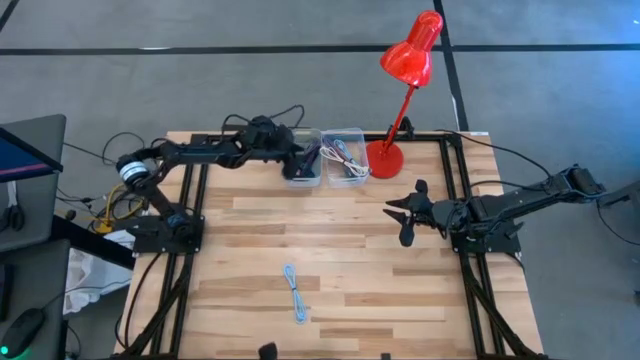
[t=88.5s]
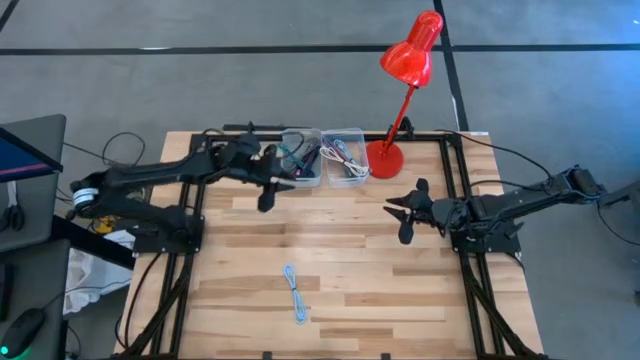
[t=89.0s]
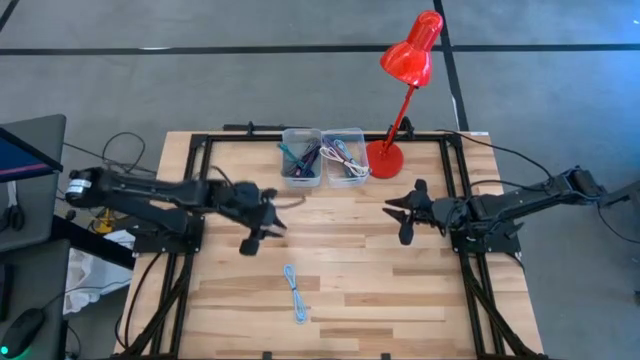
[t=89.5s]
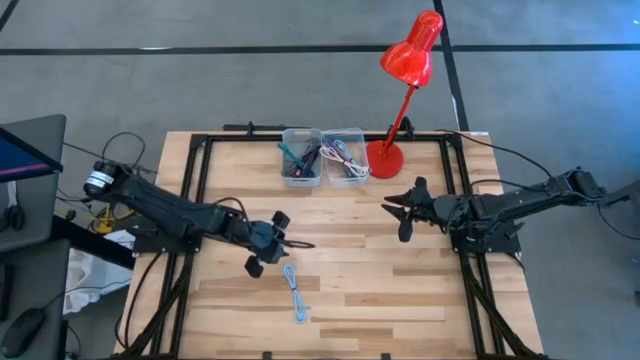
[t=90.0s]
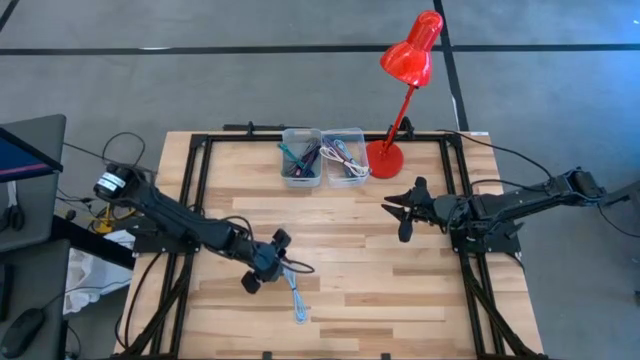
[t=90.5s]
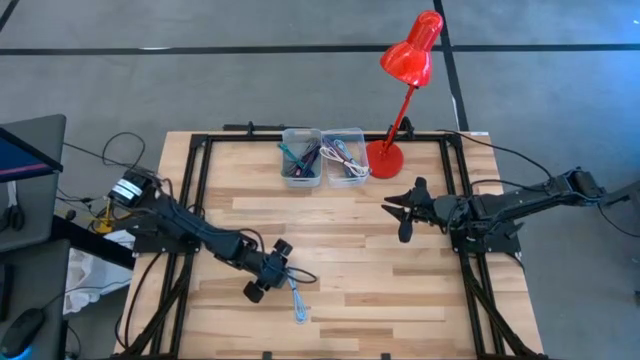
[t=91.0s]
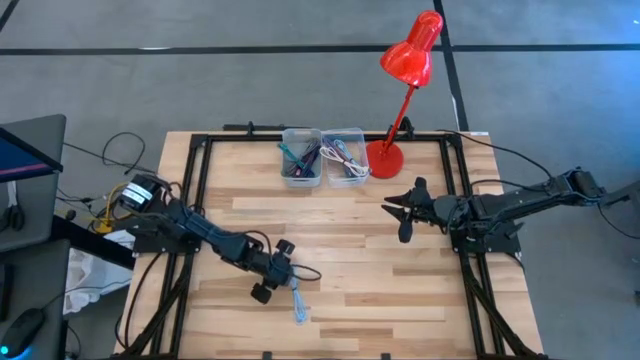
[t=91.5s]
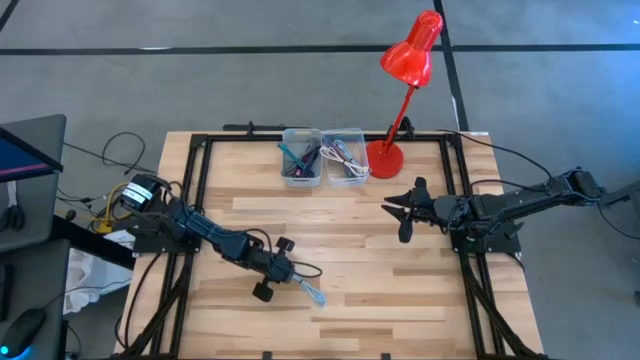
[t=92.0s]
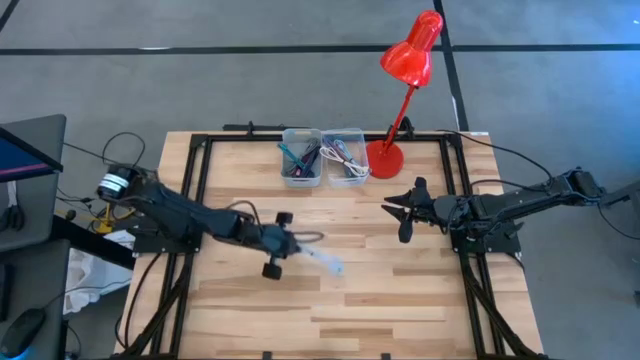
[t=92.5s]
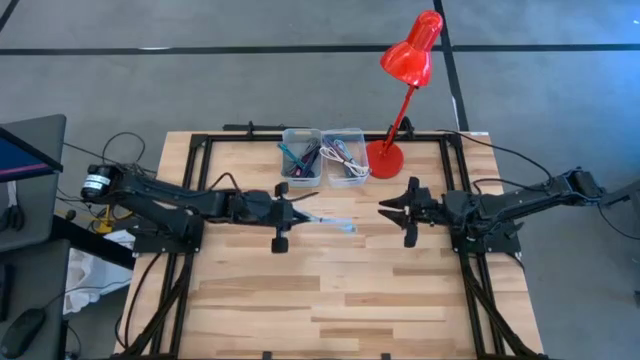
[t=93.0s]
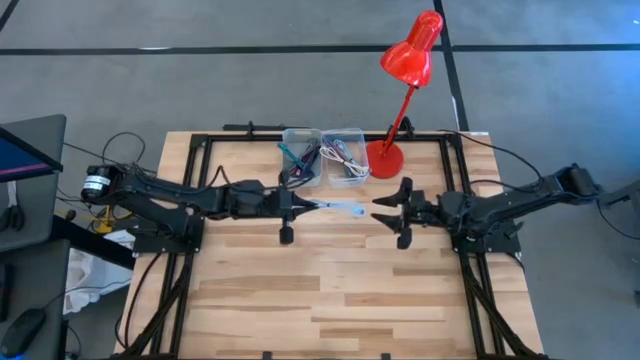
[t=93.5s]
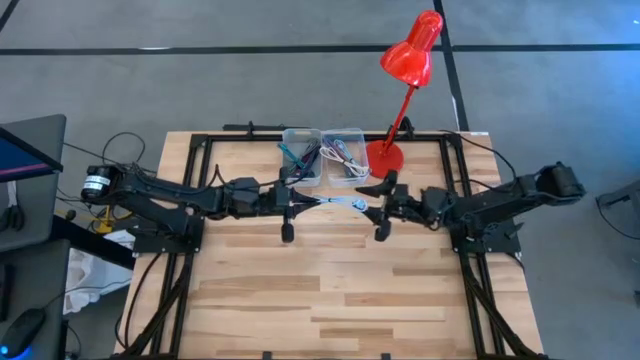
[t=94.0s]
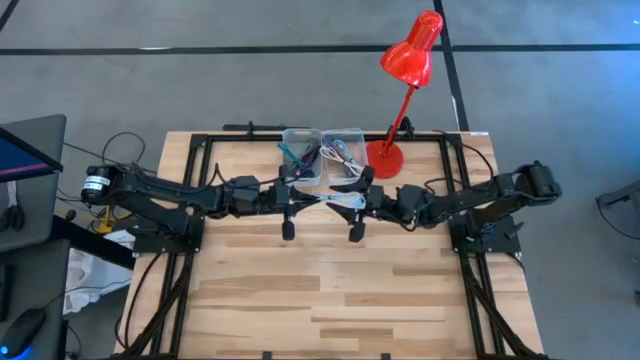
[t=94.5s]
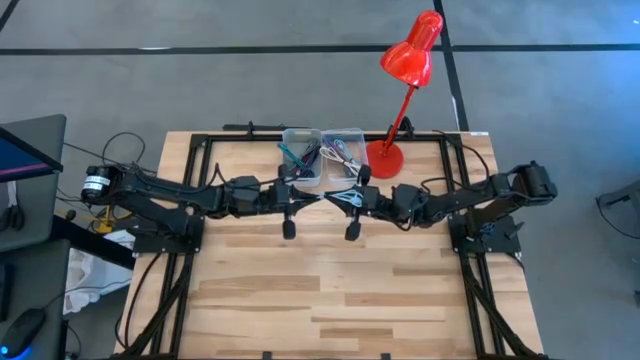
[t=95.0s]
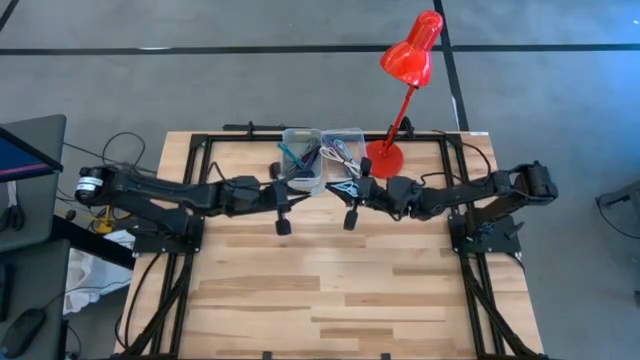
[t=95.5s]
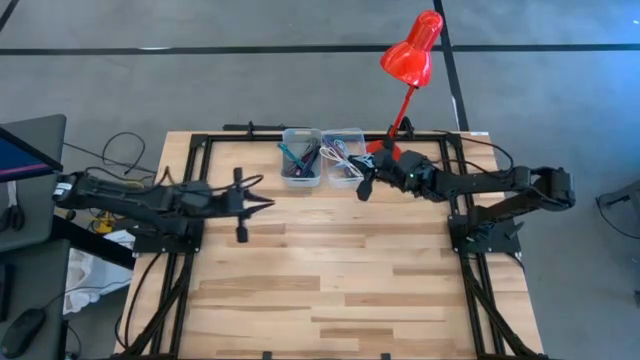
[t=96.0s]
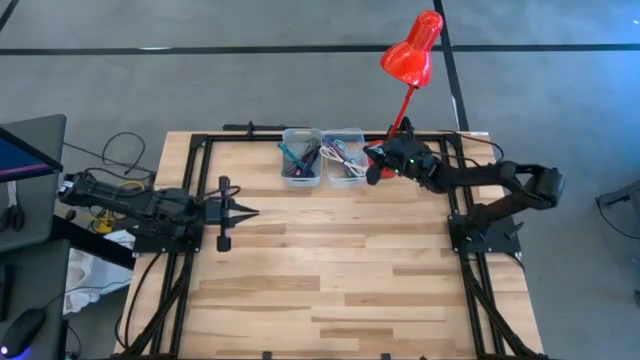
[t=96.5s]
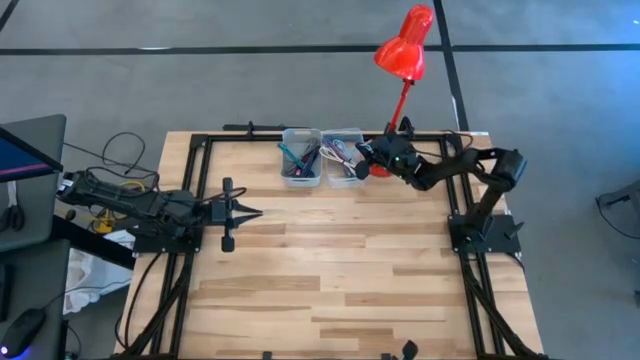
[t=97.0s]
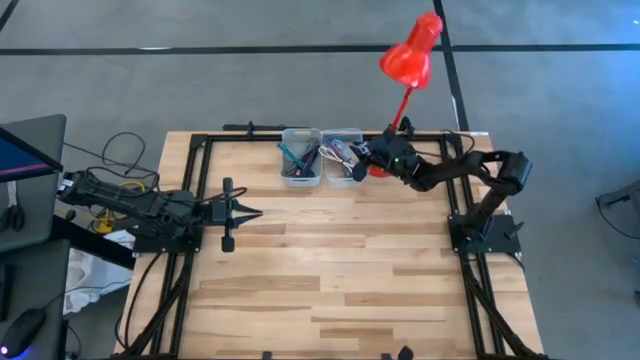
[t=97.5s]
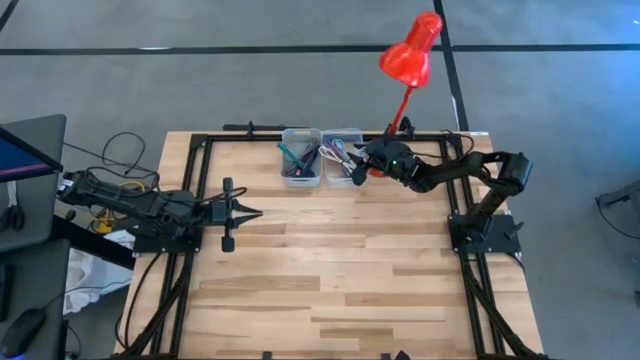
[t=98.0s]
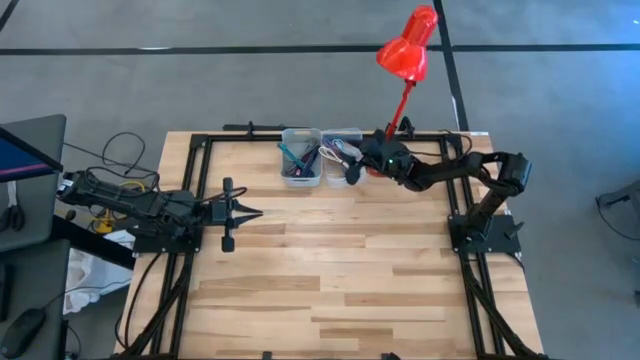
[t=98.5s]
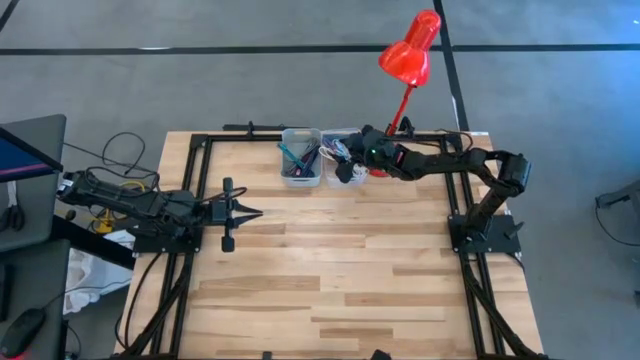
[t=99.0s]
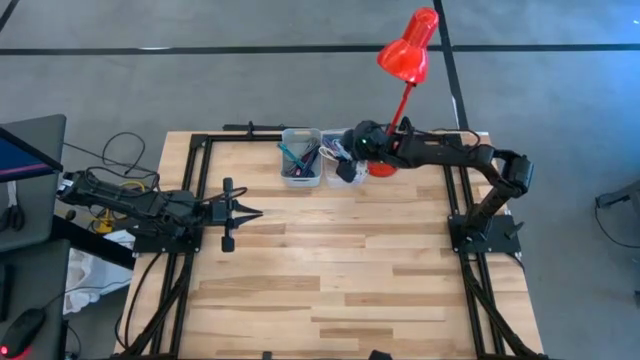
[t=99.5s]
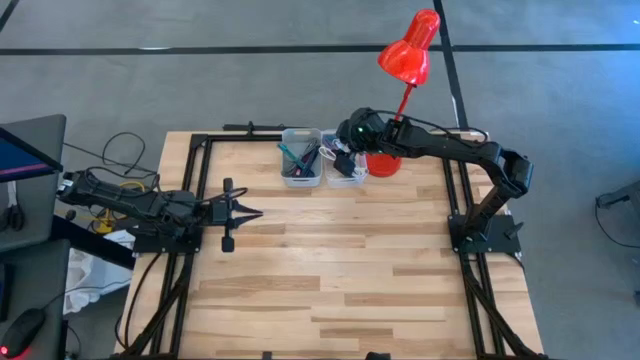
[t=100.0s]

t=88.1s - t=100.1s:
Task: Pick & Place USB Port
Put the light blue charger cable into the transparent bin

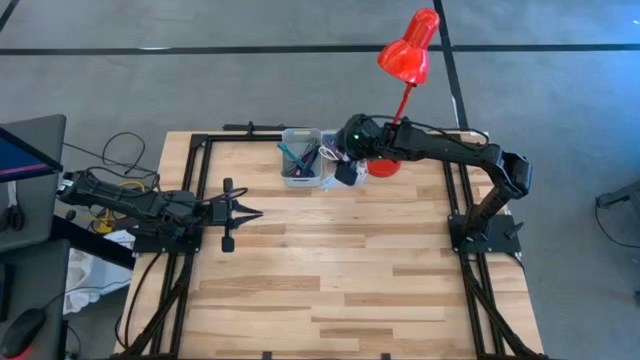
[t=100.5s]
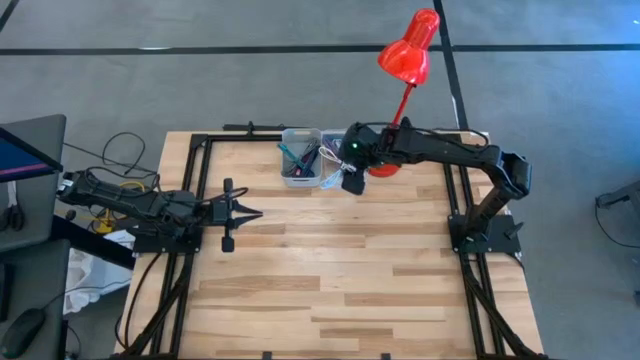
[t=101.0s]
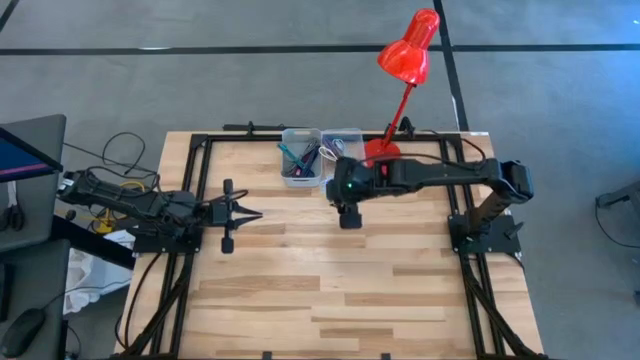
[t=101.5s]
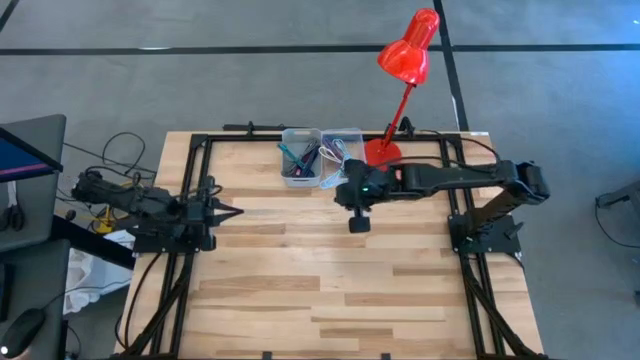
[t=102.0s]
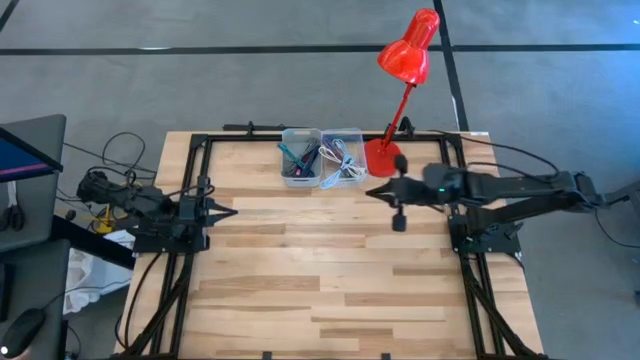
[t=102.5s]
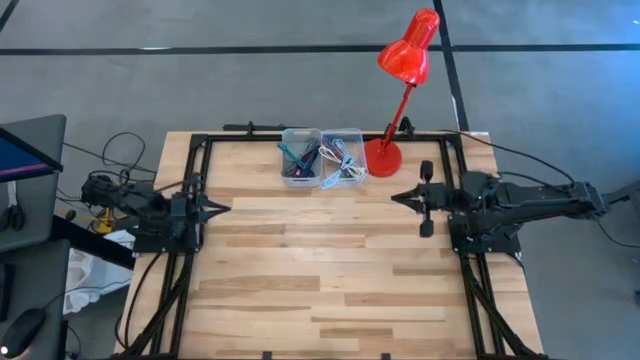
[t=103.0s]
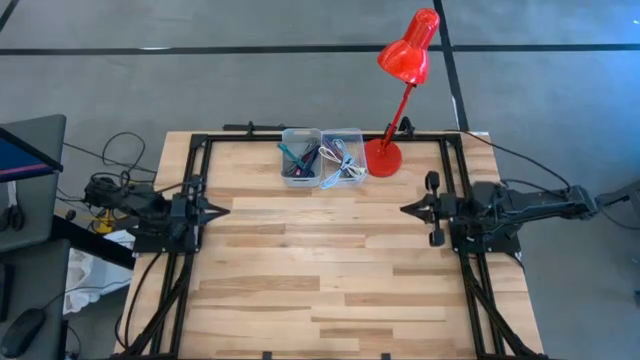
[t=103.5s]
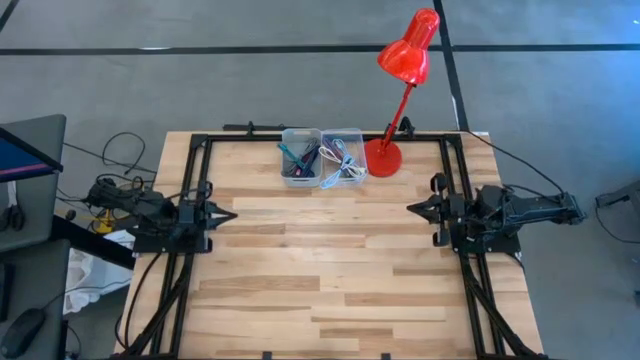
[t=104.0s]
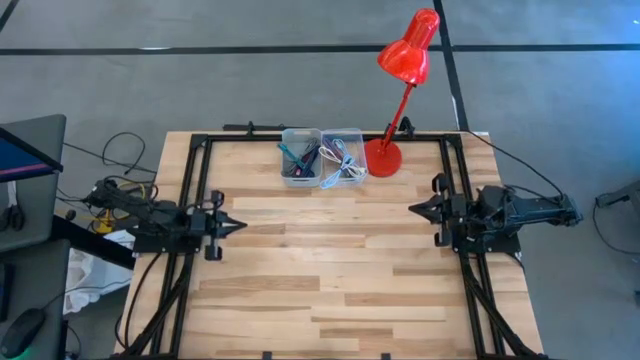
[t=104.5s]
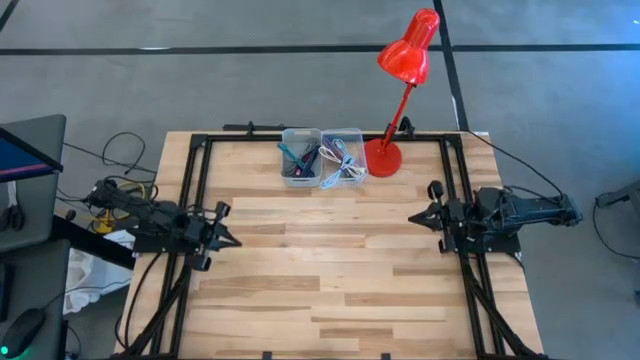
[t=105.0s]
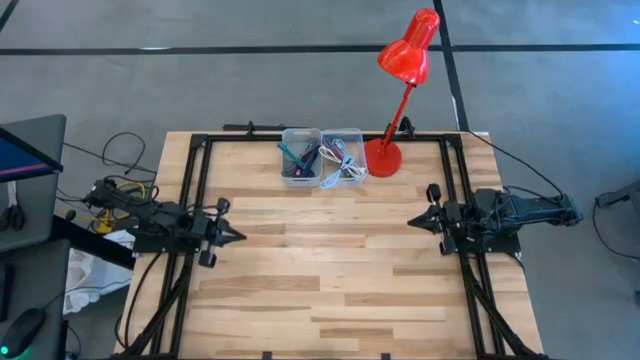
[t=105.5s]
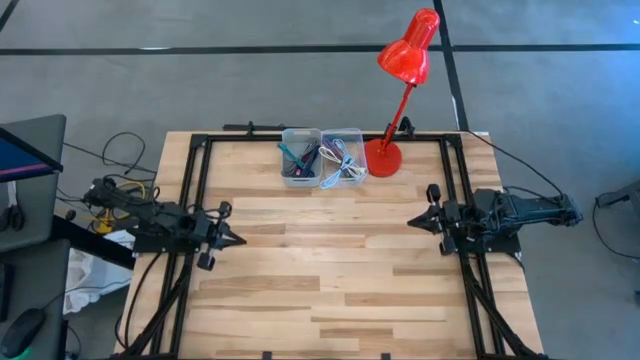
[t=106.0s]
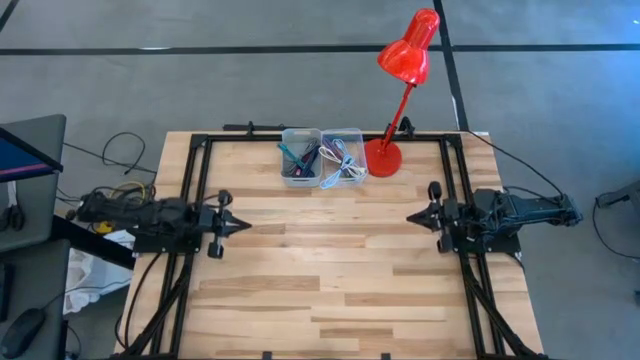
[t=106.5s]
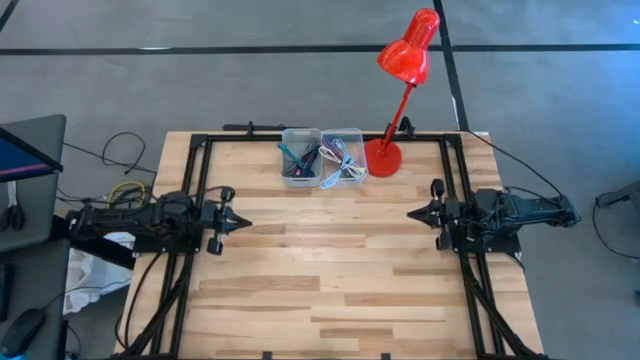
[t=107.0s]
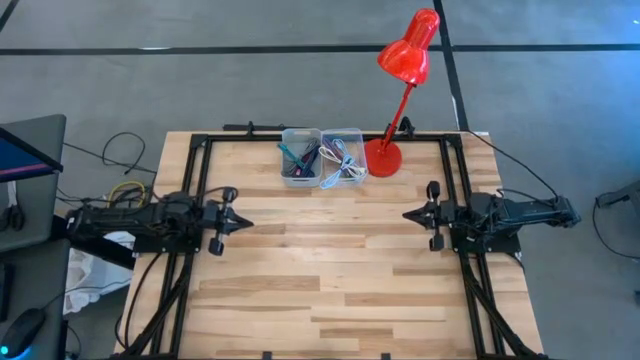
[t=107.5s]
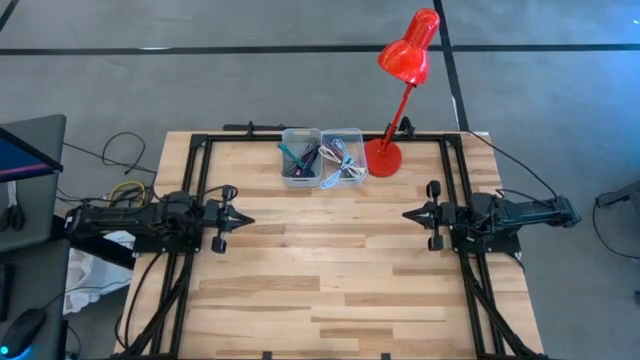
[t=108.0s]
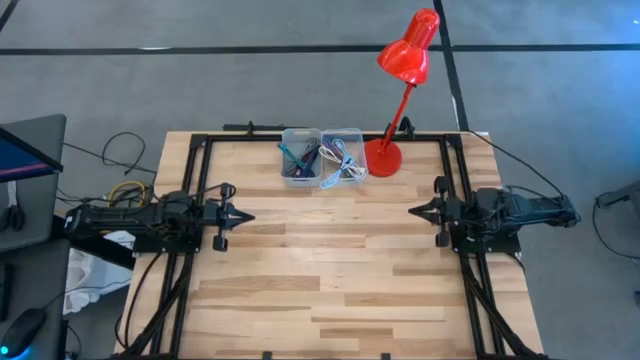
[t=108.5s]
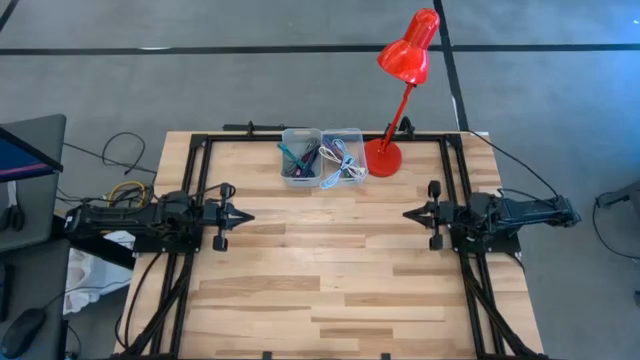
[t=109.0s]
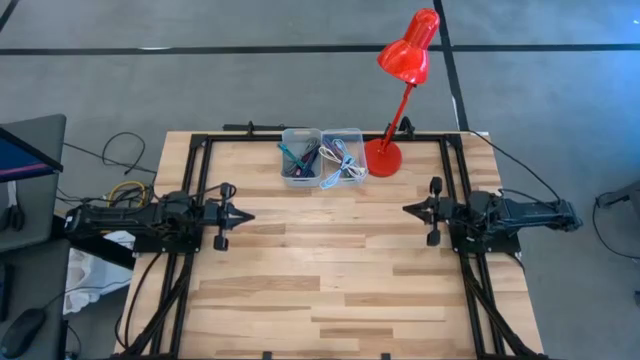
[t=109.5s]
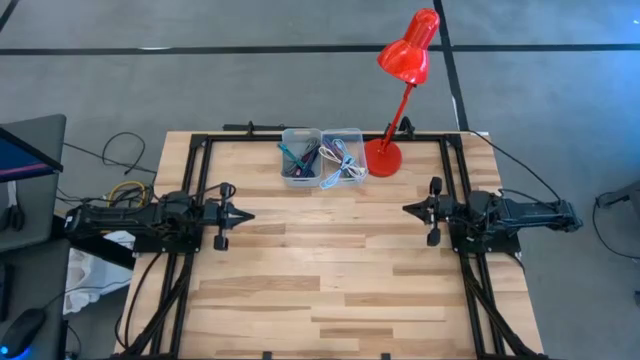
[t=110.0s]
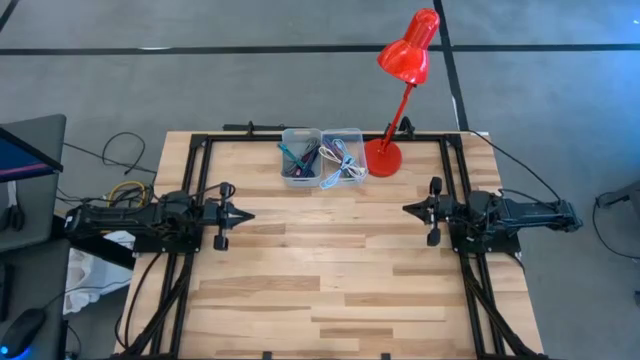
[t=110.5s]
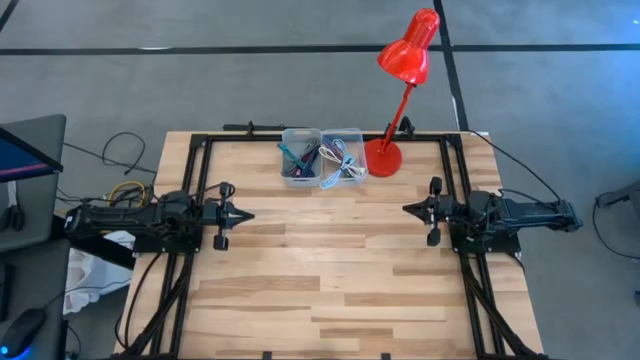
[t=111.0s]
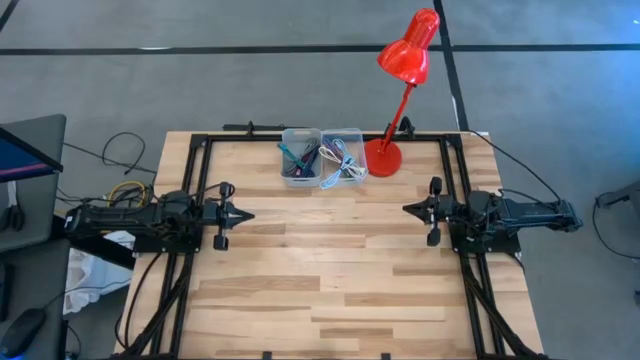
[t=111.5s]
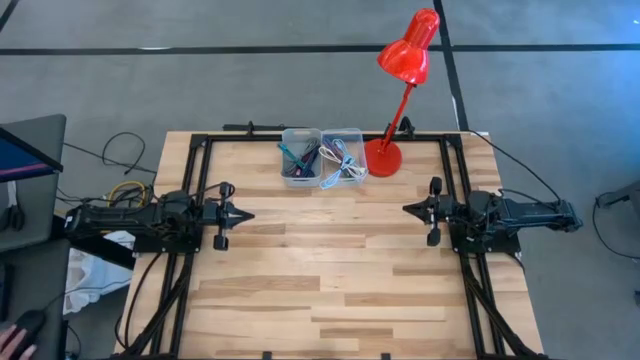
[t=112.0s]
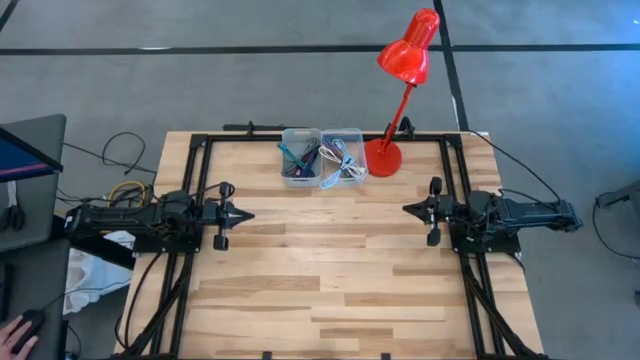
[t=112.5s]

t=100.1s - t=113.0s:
Return to Home Position
